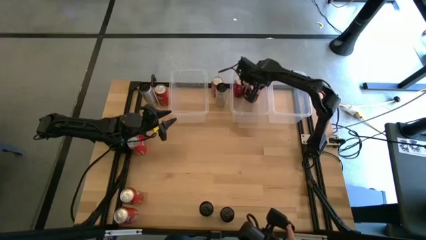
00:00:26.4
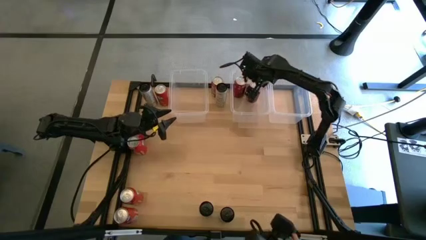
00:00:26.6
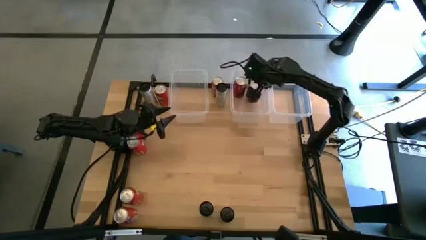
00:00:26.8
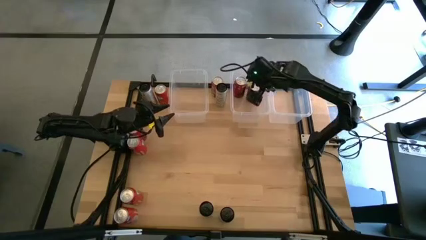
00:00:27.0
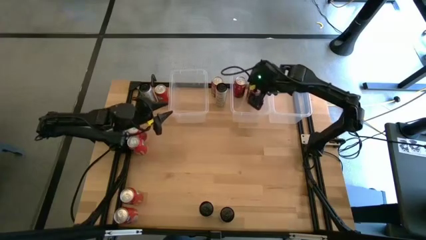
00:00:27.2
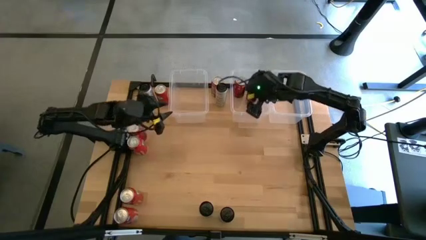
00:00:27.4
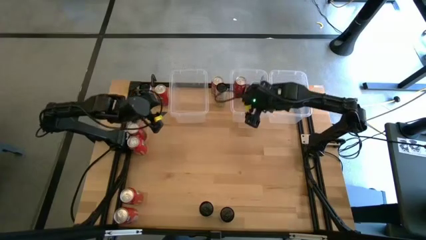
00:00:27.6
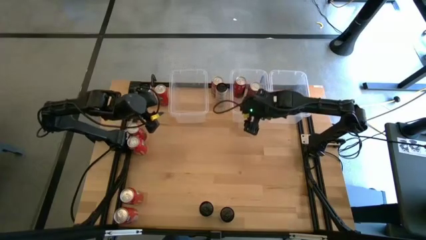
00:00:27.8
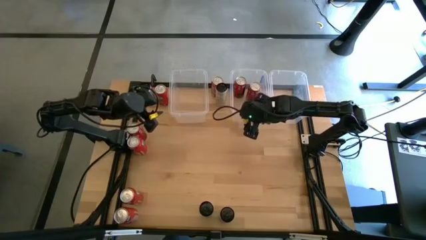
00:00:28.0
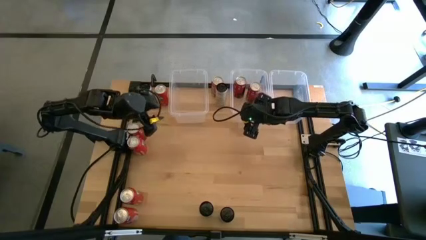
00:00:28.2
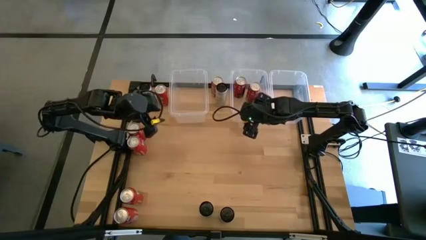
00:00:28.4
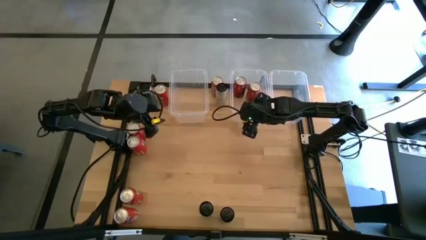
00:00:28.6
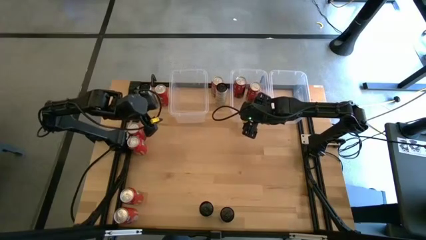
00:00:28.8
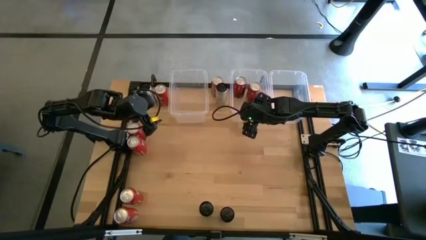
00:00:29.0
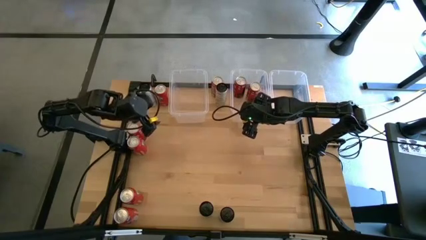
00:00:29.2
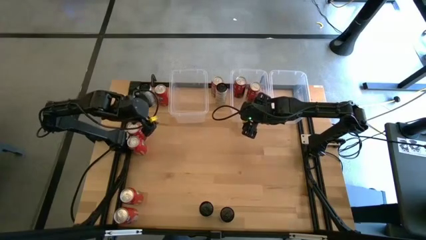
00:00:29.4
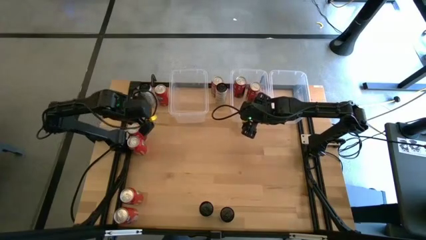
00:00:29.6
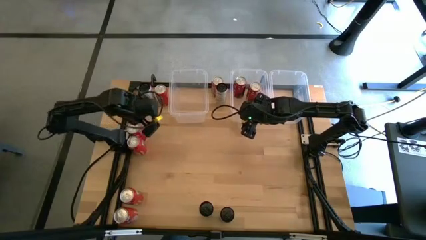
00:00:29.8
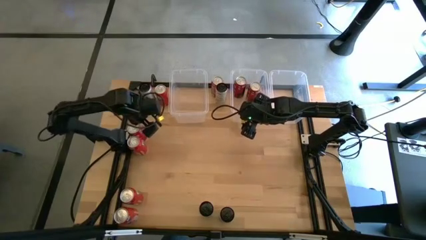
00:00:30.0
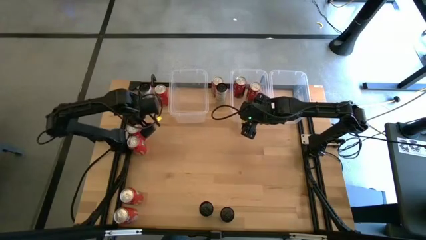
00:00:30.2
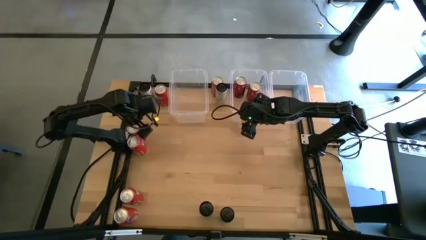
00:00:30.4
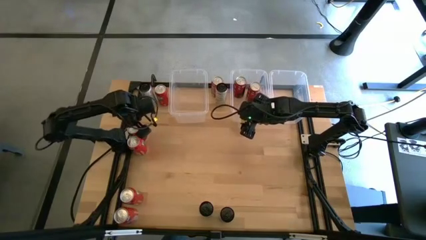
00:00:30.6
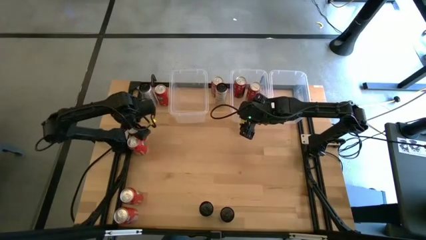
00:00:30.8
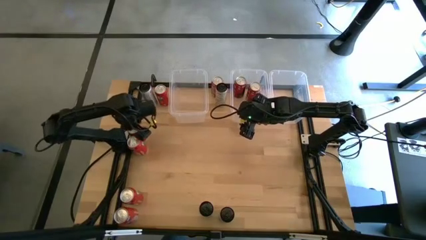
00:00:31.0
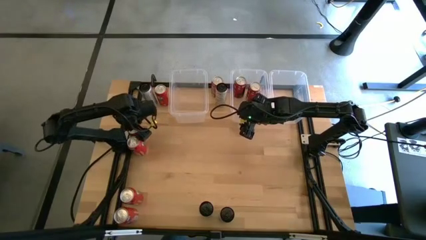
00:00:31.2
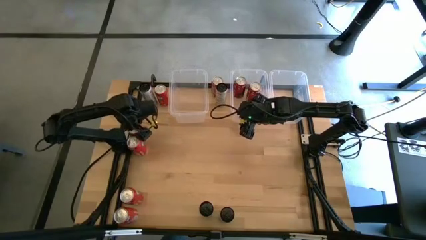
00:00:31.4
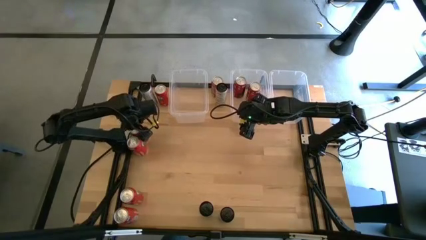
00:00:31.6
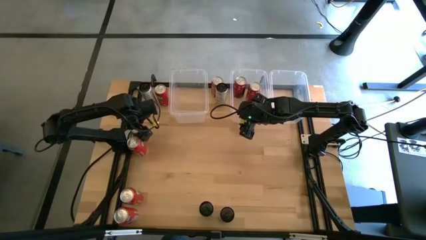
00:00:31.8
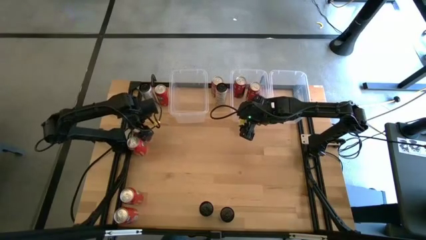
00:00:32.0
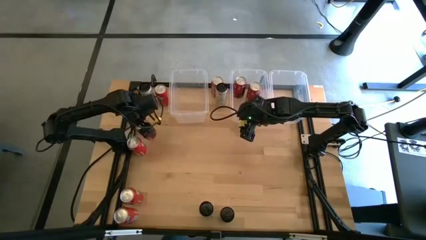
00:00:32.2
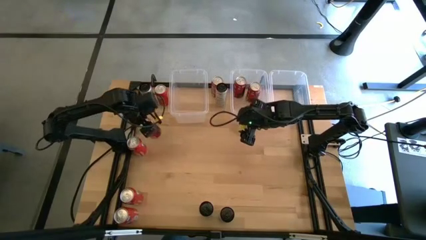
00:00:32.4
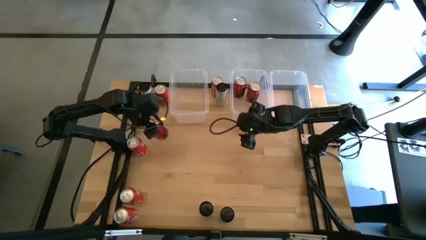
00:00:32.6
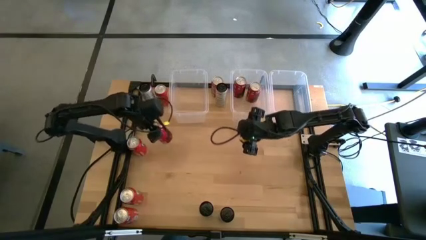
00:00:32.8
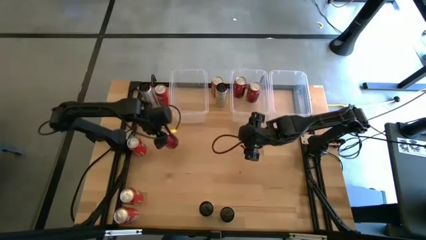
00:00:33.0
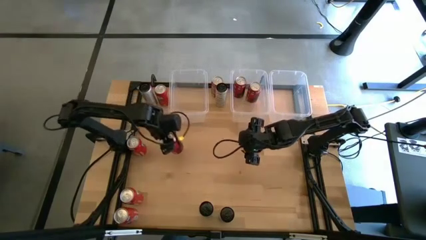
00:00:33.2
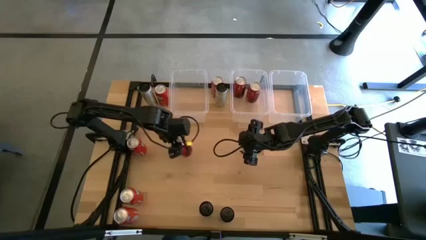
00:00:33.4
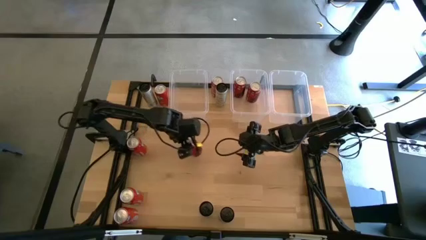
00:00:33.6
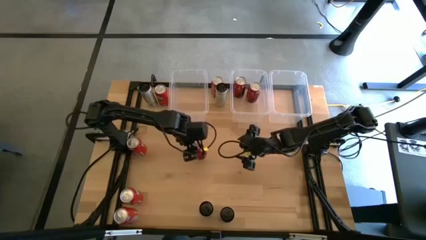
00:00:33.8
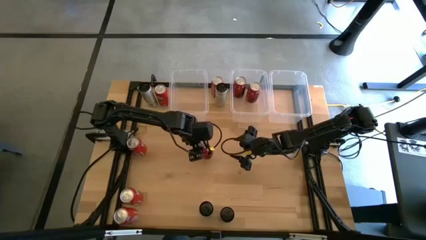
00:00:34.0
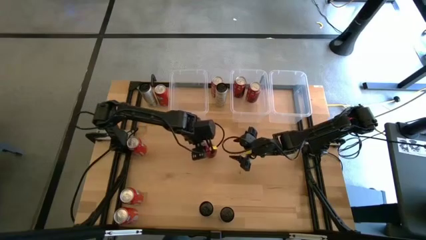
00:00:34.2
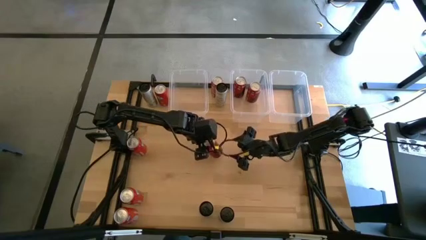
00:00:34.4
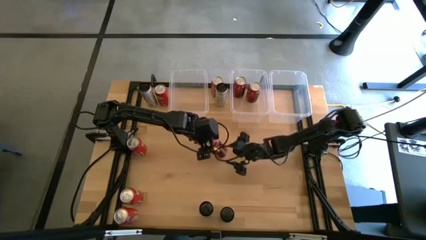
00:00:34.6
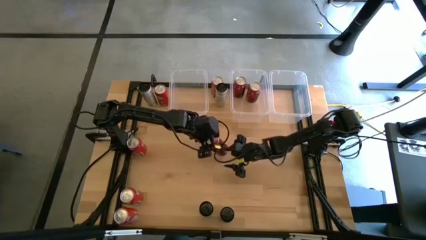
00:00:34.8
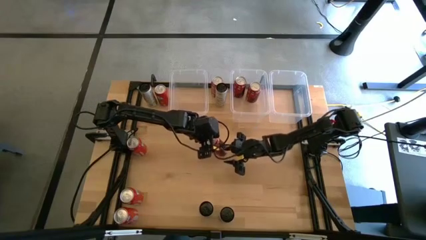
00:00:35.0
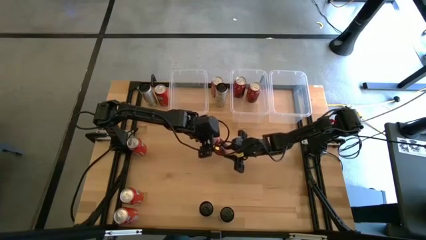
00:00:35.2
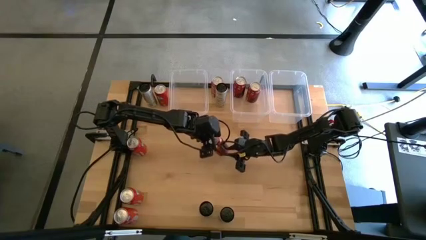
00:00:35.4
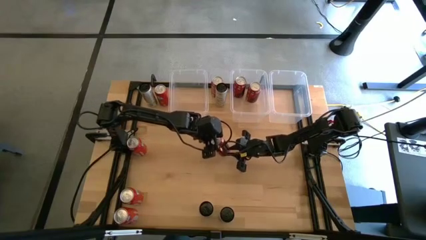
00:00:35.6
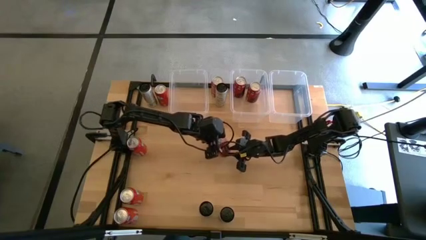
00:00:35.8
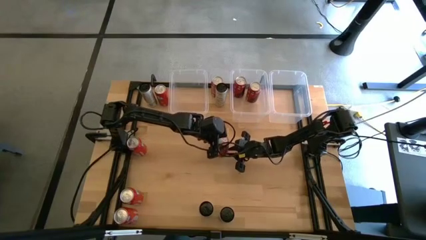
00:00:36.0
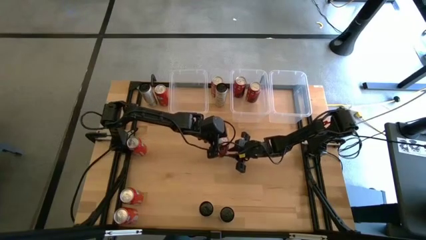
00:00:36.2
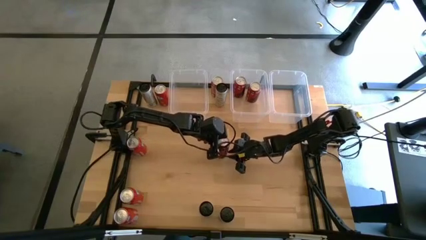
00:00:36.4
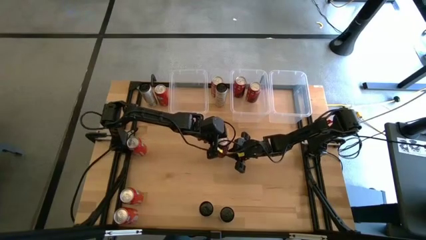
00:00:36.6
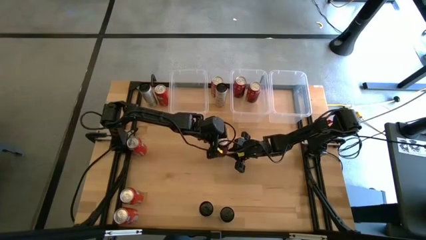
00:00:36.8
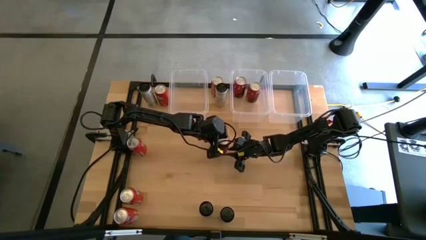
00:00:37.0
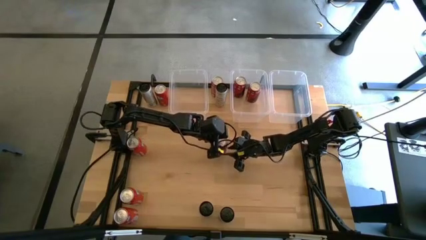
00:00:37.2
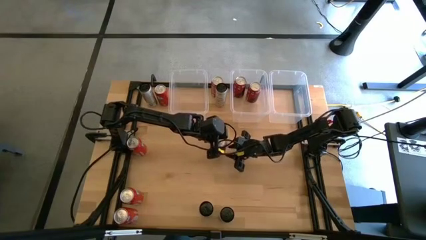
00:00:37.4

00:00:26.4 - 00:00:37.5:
Task: Sort soda cans
Move the bottom red soda can to the center of the table

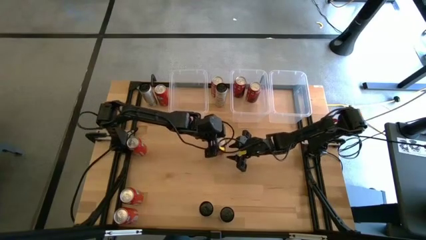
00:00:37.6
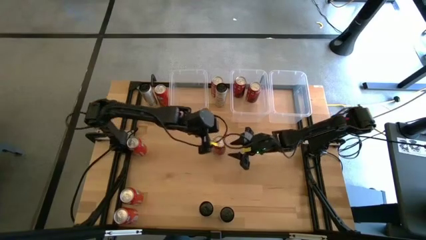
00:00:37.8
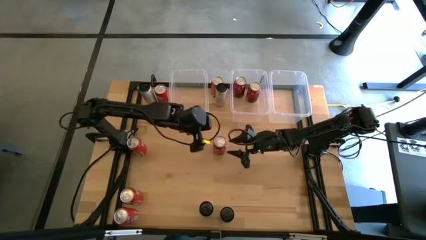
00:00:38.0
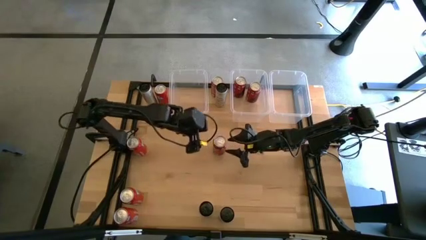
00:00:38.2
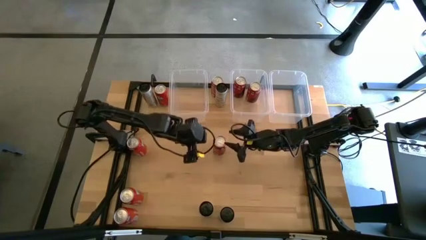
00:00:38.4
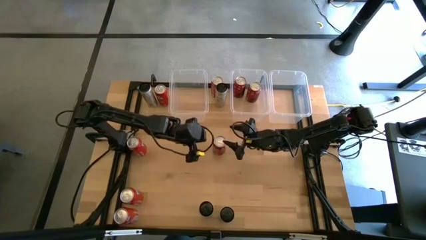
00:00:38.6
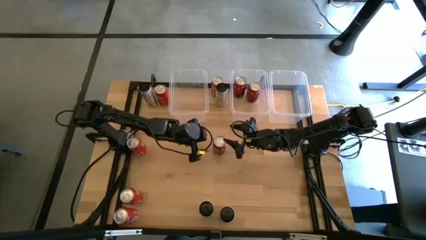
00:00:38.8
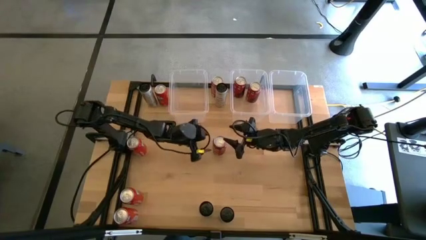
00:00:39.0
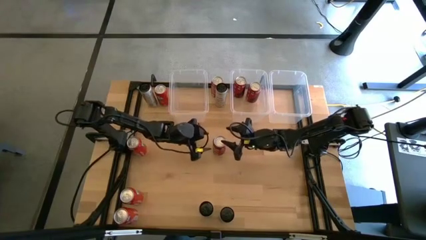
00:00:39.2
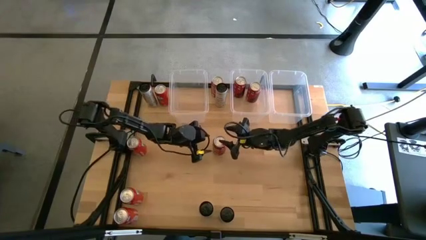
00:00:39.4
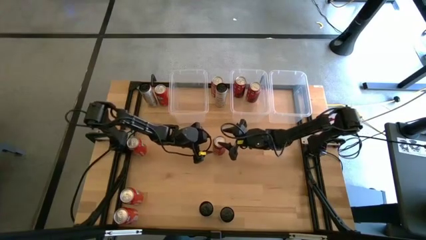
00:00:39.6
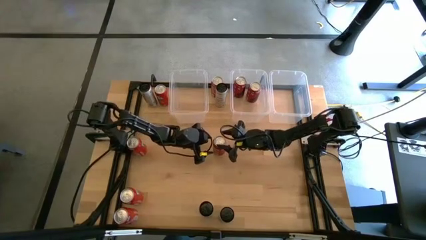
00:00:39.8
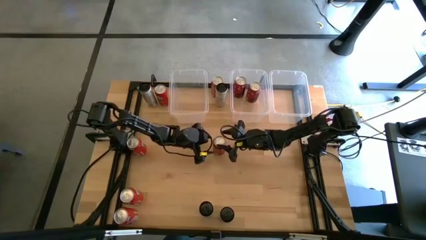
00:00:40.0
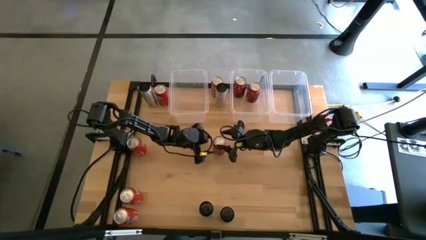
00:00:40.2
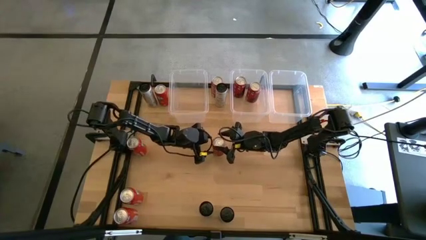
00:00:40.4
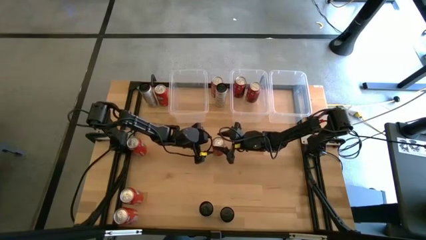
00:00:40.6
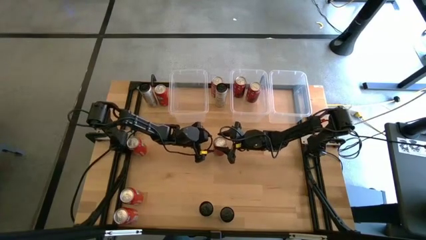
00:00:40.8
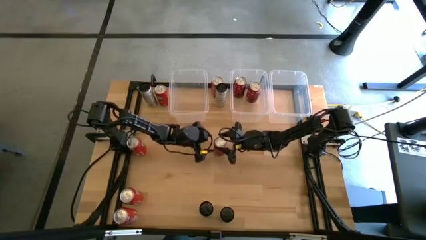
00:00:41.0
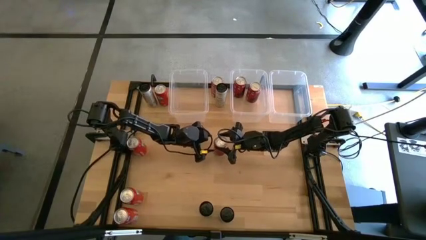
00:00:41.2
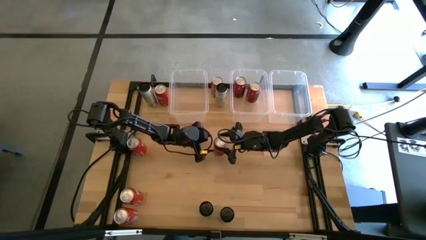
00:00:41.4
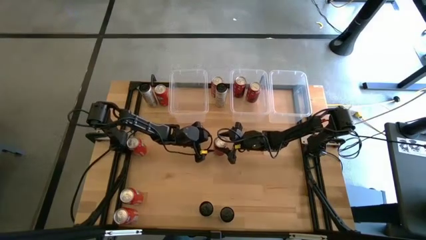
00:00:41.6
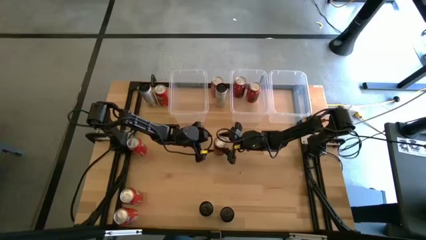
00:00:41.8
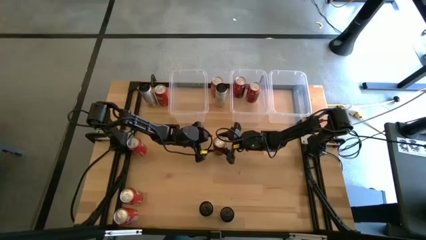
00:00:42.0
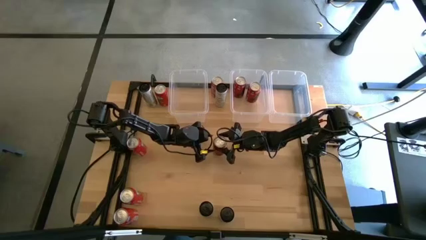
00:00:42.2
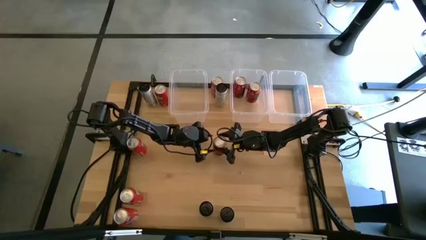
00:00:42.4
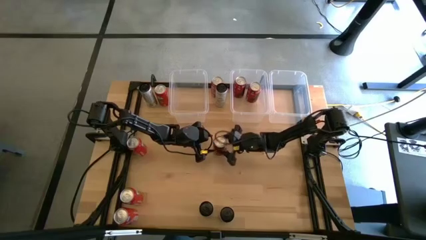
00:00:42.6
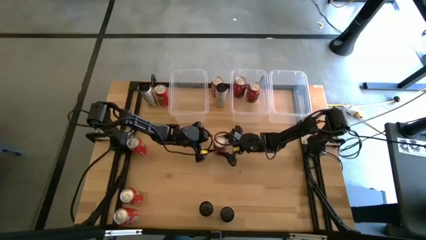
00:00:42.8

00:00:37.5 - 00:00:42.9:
Put the bottom red soda can into the center transparent bin
